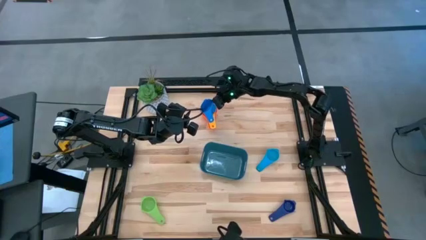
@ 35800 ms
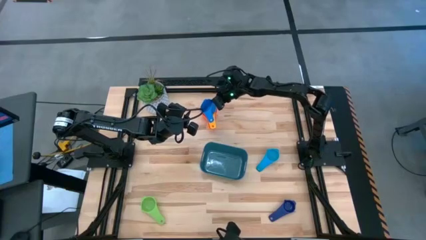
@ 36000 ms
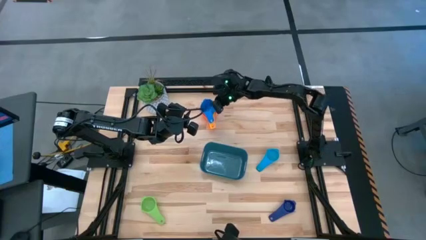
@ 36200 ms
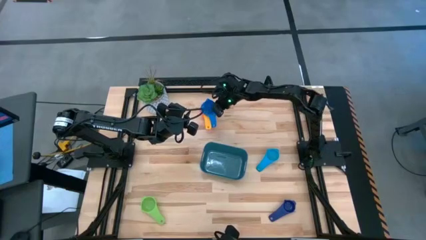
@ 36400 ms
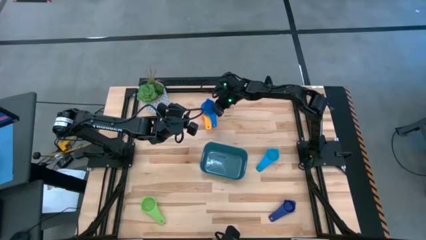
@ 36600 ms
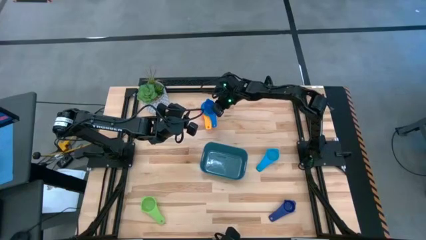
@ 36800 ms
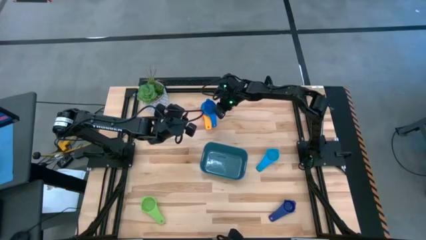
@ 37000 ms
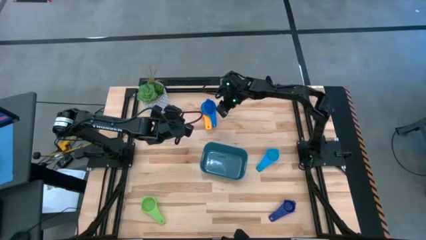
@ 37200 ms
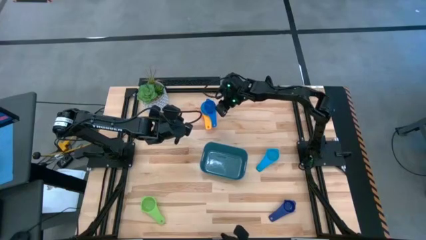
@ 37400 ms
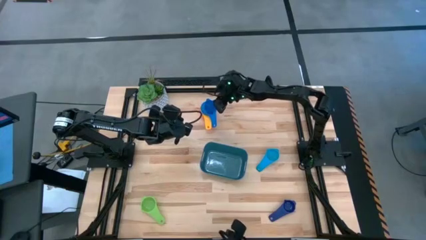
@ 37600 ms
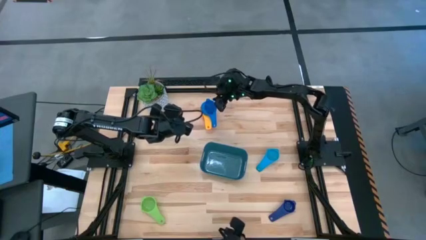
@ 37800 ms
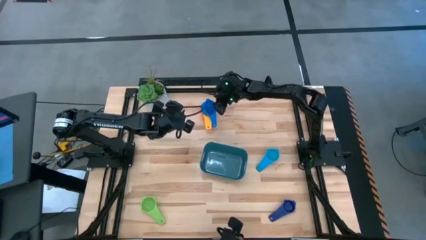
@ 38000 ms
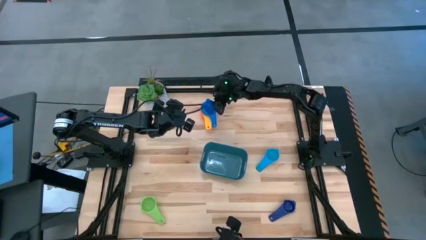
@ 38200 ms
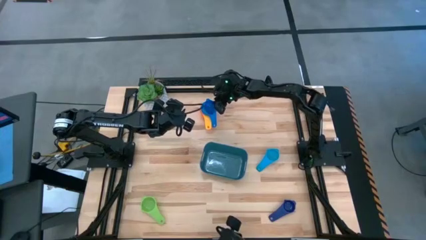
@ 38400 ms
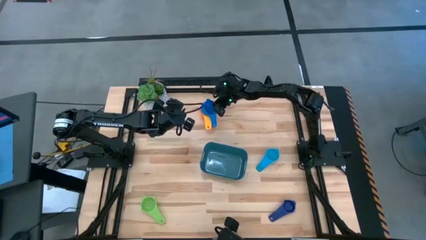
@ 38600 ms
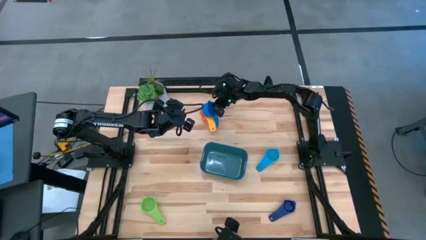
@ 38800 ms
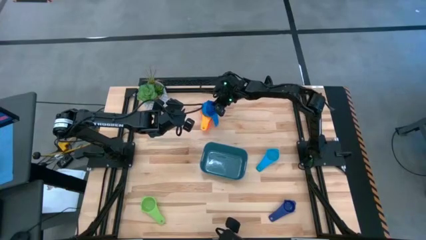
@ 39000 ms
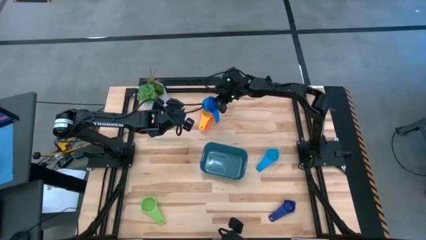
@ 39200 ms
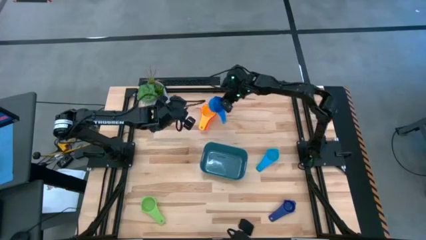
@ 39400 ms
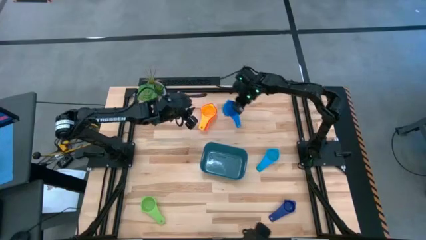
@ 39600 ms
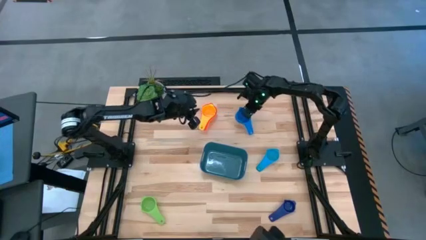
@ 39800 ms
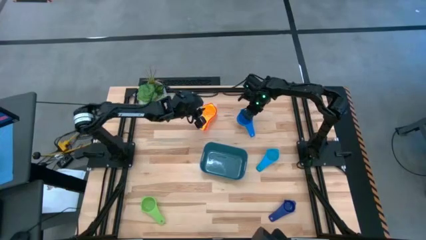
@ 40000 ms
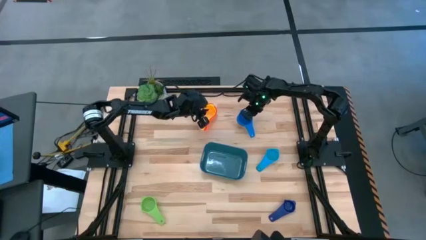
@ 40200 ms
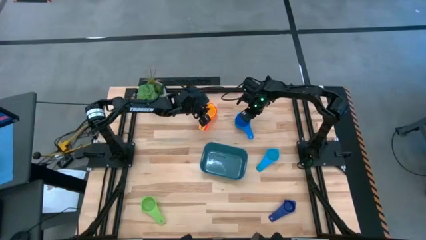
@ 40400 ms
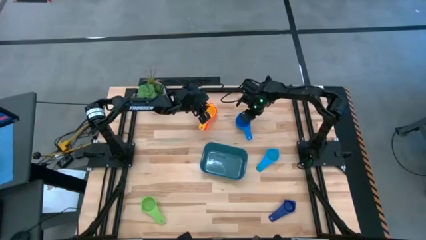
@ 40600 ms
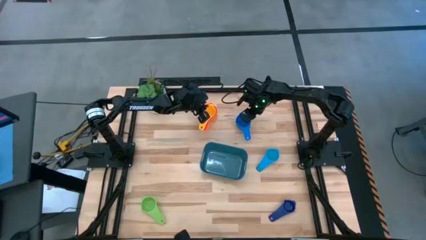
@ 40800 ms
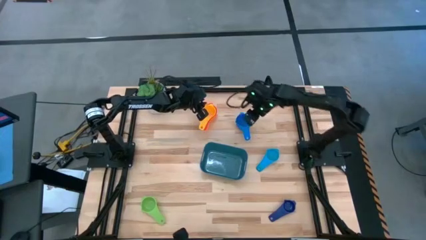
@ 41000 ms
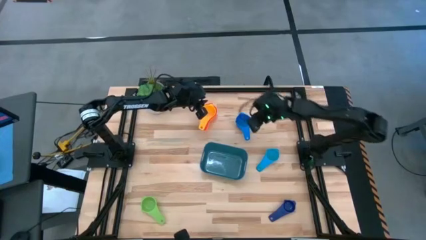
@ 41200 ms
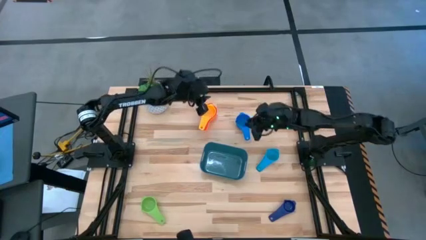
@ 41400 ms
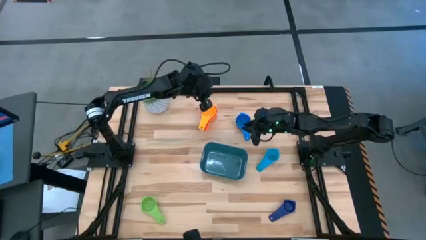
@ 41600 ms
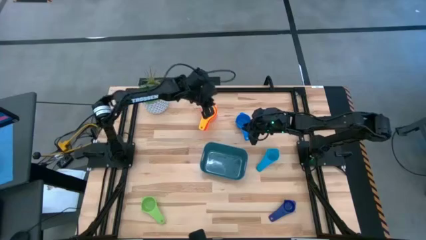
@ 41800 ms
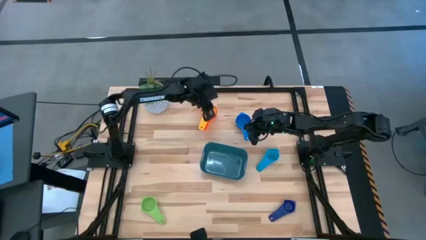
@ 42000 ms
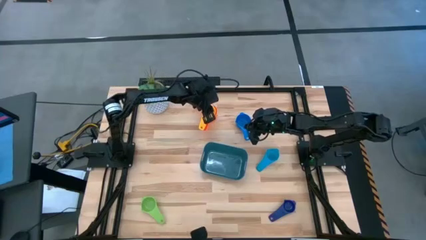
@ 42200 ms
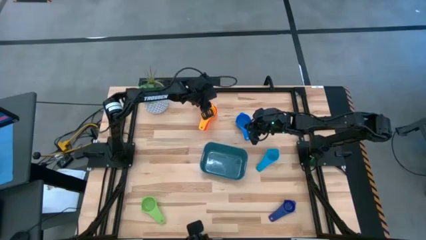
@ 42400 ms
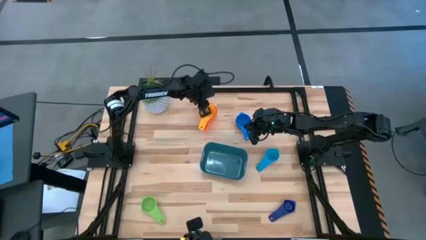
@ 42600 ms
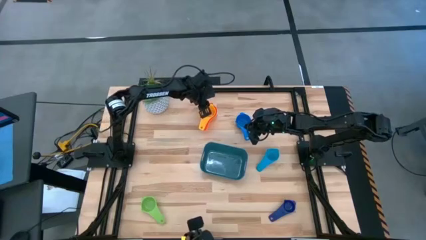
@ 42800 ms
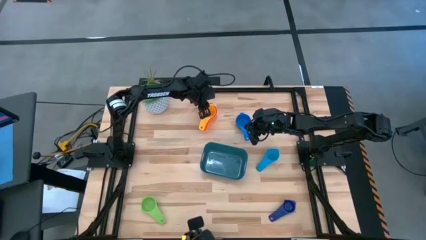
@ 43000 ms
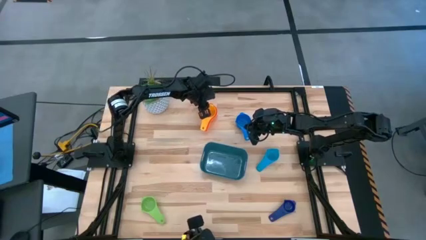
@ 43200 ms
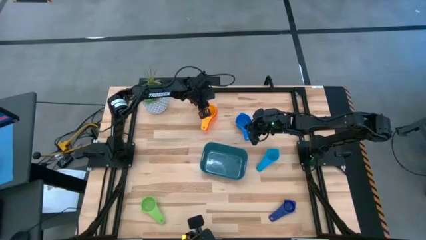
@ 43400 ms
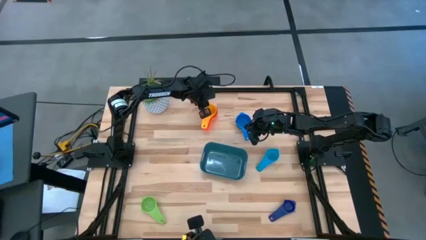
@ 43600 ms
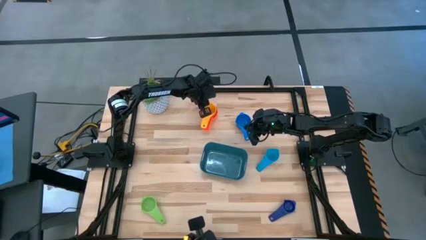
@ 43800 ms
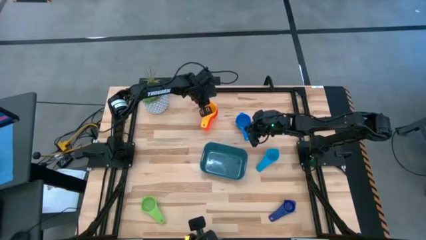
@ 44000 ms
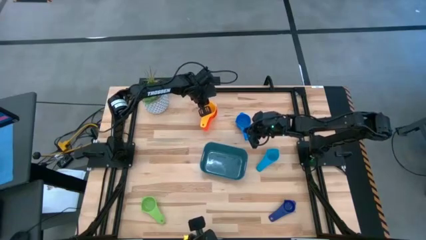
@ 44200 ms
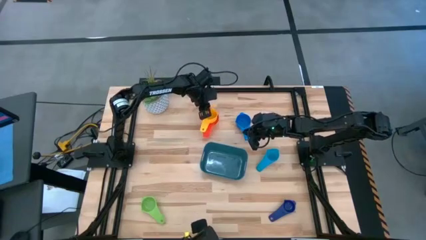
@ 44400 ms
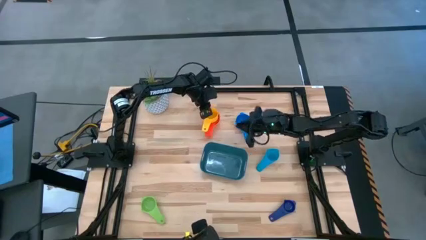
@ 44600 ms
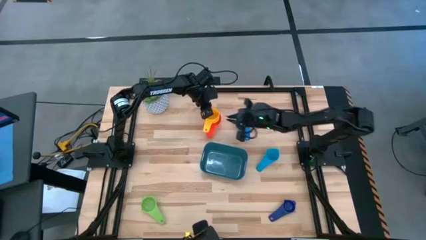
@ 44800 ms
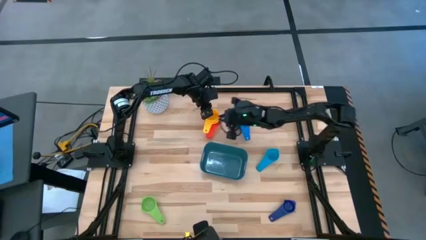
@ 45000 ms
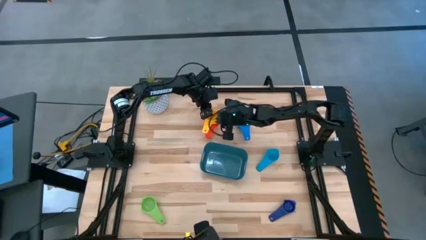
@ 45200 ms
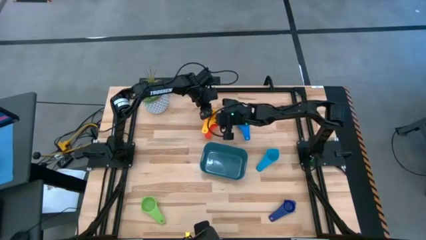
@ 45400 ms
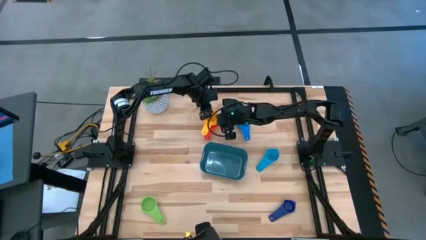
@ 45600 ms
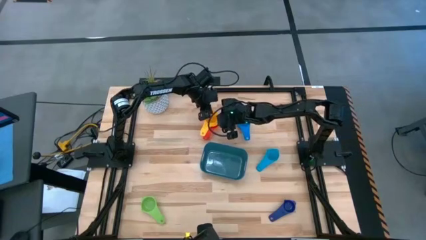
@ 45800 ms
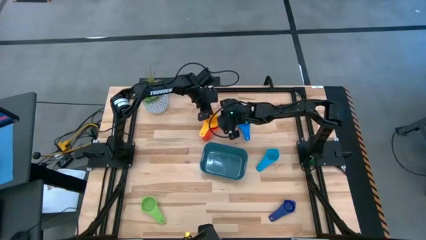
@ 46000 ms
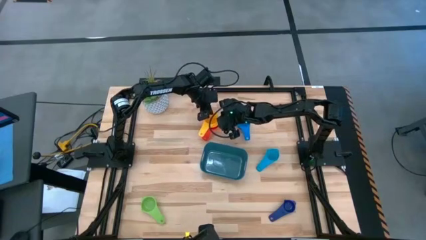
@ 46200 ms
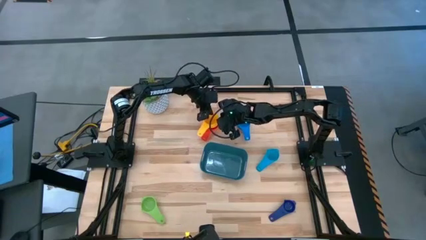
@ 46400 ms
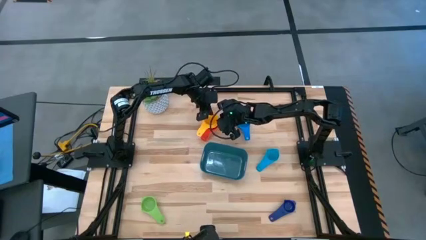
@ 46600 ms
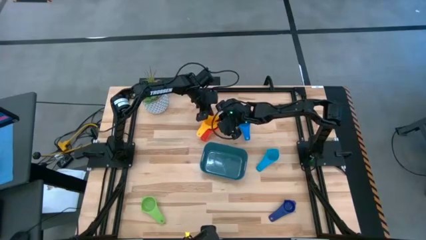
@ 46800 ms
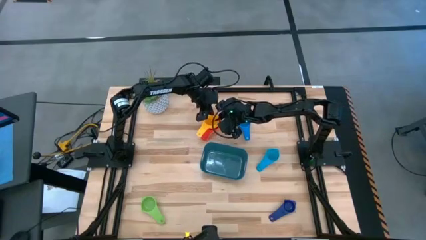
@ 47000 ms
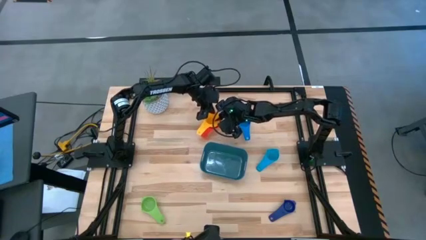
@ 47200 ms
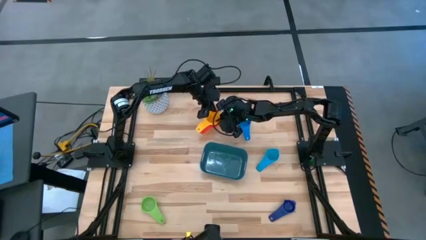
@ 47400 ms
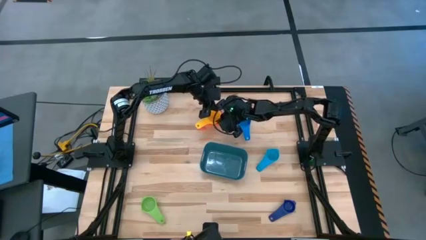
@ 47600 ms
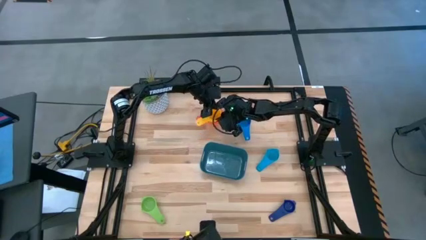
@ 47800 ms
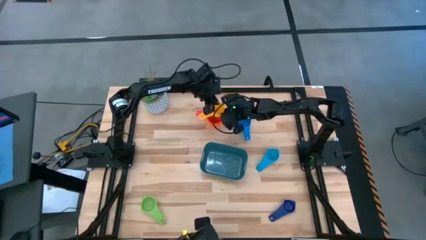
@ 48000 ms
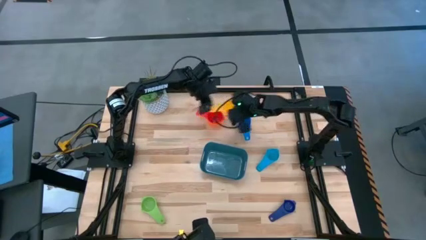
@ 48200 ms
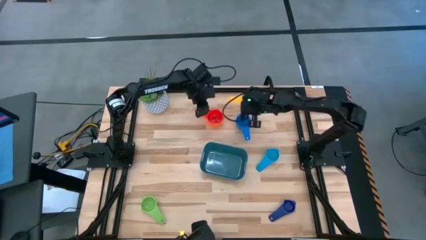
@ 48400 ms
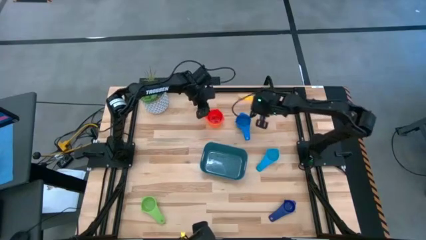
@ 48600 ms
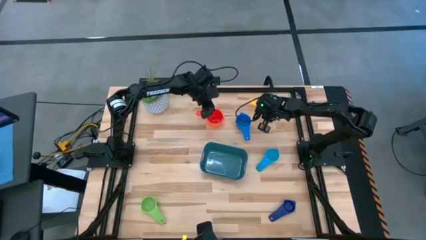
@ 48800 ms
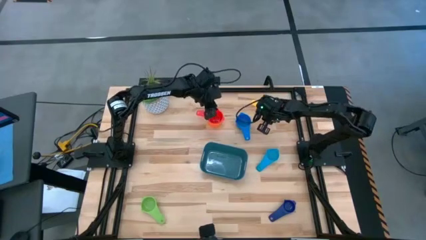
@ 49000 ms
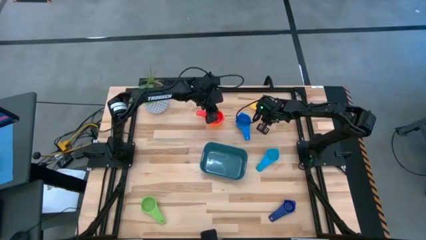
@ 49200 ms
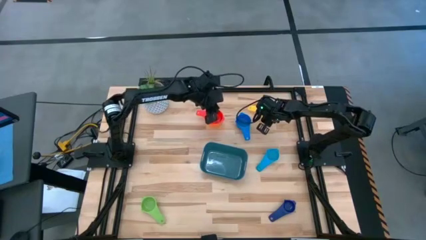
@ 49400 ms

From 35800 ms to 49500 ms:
Task: Nest measuring cups in basket
Stack the blue measuring cup on top of the red measuring cup

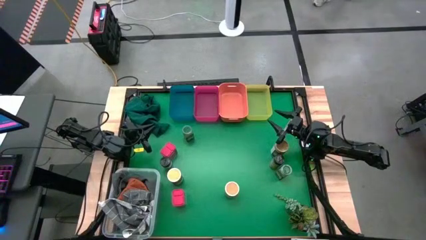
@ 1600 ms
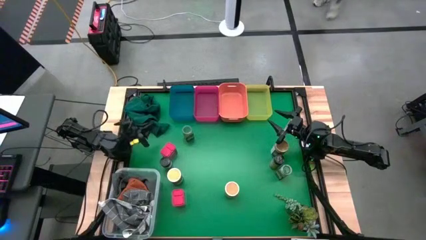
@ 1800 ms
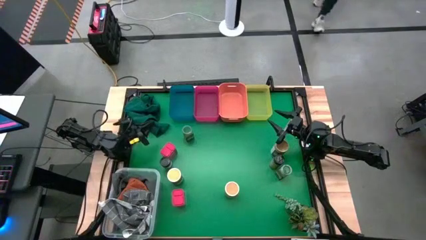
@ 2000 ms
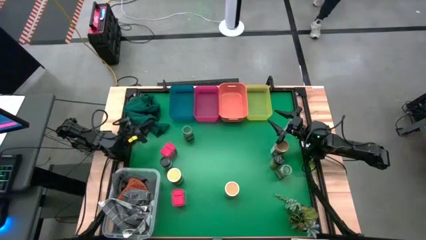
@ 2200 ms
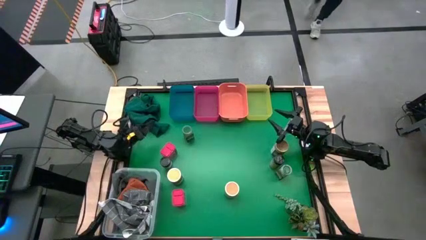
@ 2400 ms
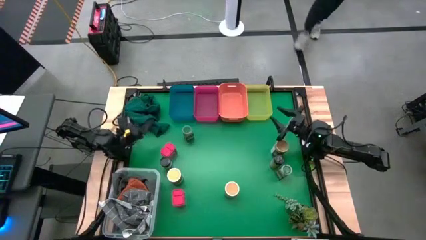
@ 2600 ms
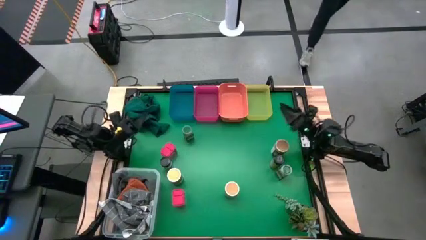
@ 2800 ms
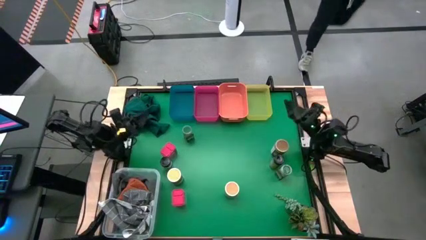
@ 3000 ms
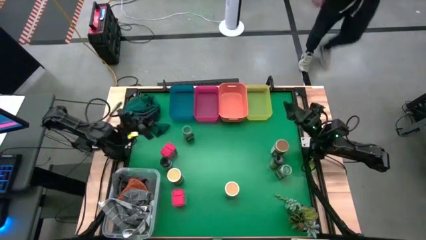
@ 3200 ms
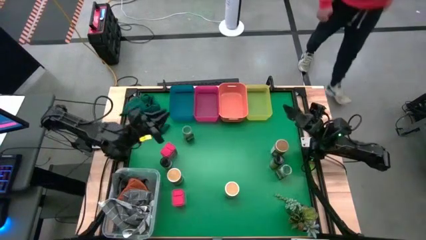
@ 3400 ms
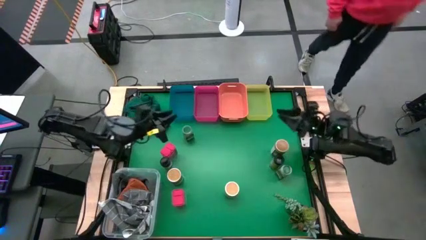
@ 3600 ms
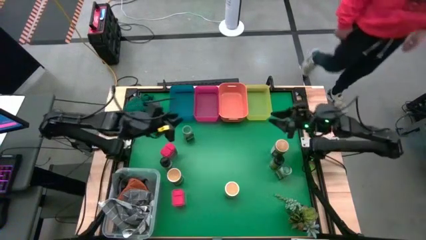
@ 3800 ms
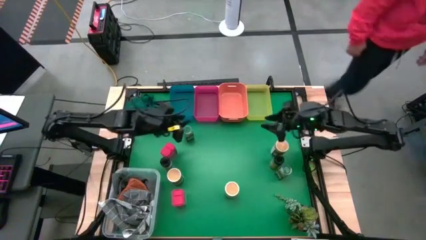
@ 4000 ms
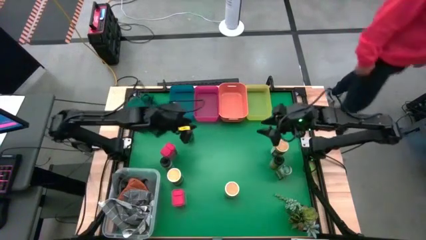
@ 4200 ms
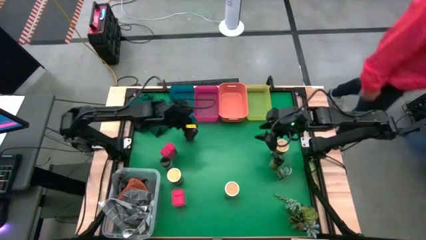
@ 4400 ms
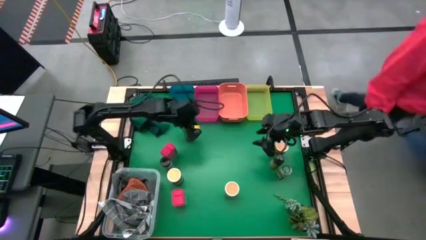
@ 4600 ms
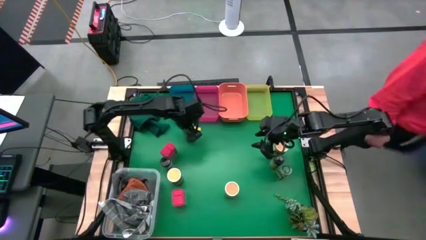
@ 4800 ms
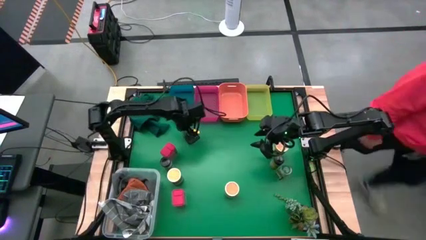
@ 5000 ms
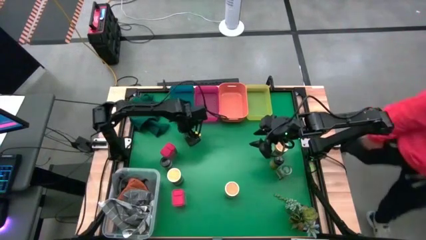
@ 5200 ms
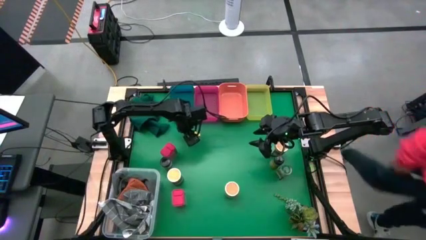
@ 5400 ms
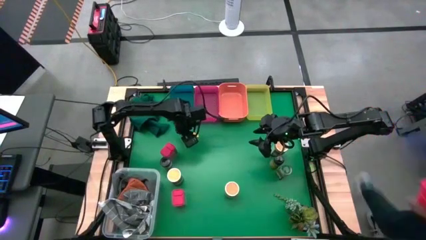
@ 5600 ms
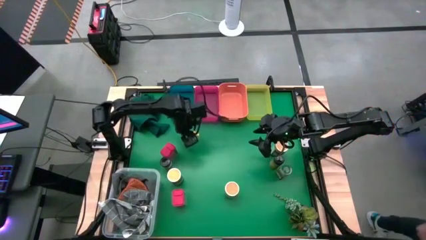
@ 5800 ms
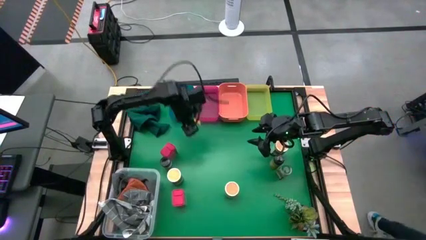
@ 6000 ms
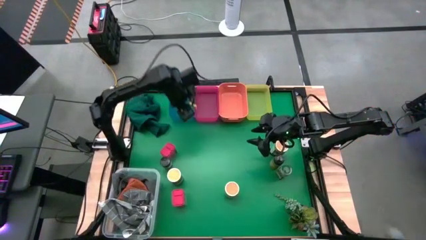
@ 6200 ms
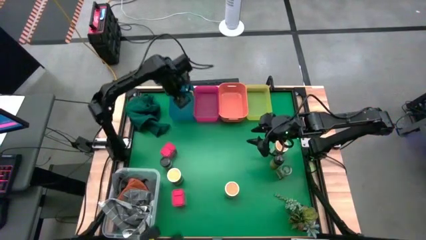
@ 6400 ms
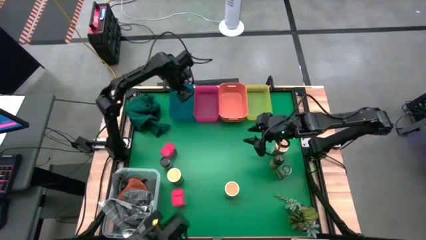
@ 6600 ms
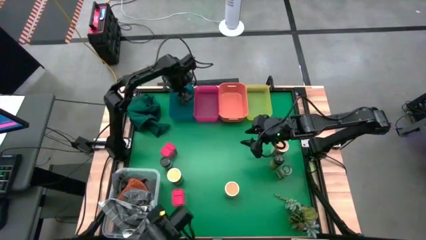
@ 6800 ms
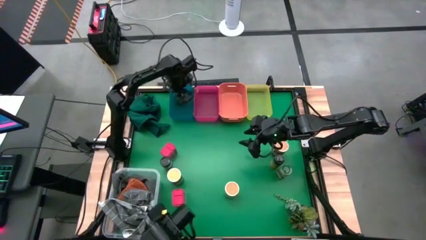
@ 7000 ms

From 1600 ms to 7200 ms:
Task: Sort spices by type
Put the top green spice bottle into the blue bin
